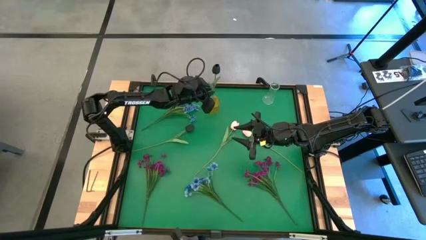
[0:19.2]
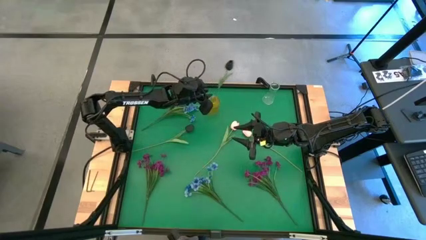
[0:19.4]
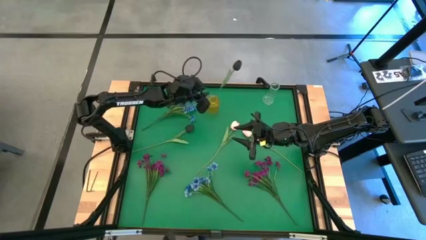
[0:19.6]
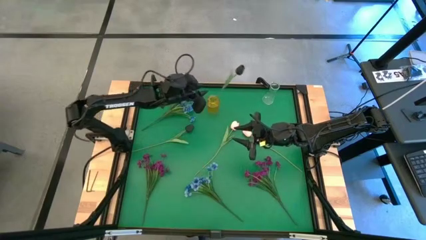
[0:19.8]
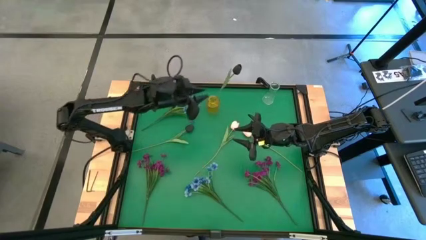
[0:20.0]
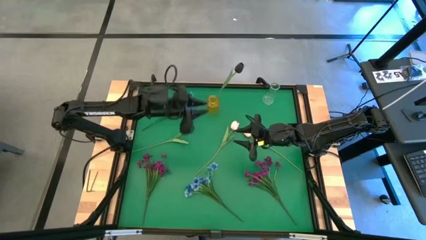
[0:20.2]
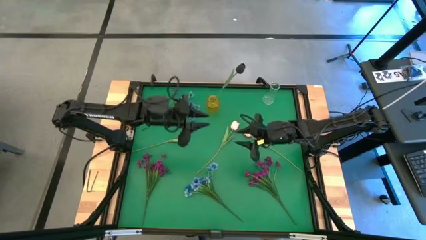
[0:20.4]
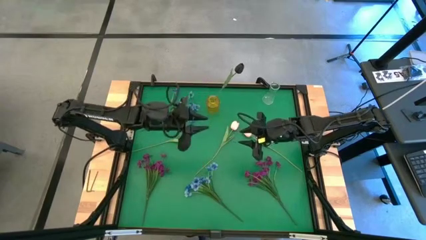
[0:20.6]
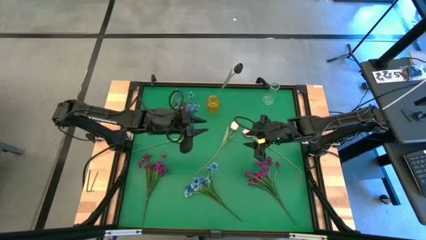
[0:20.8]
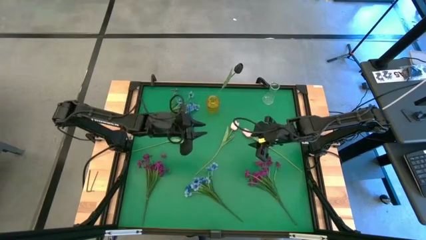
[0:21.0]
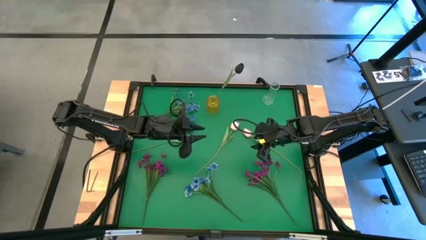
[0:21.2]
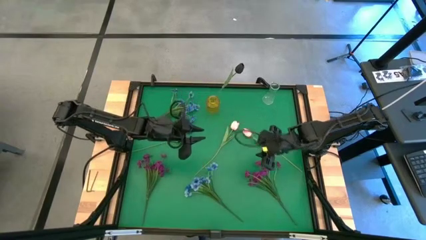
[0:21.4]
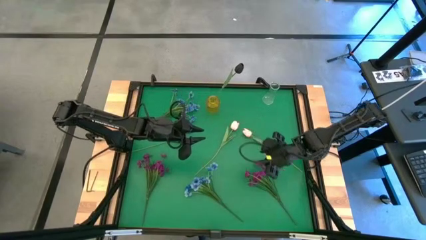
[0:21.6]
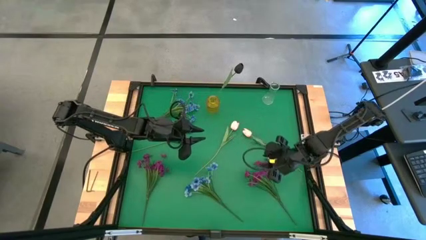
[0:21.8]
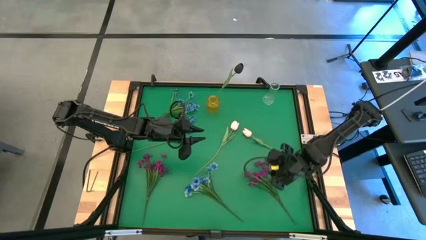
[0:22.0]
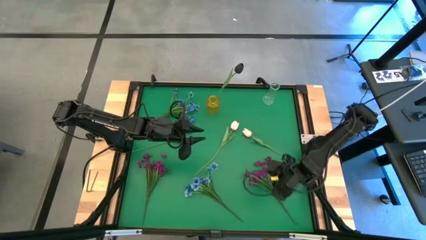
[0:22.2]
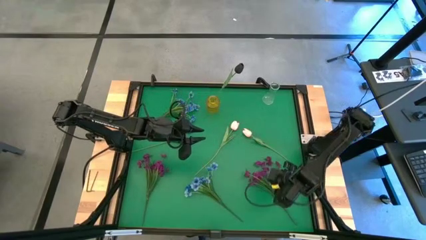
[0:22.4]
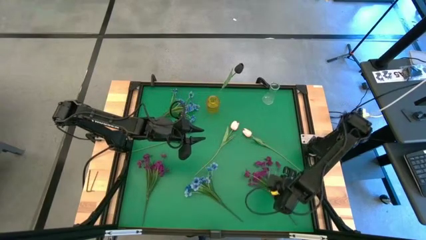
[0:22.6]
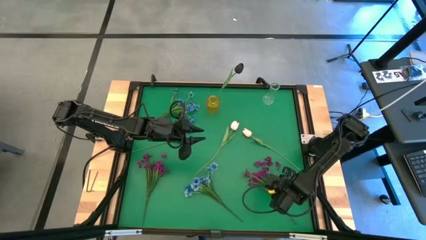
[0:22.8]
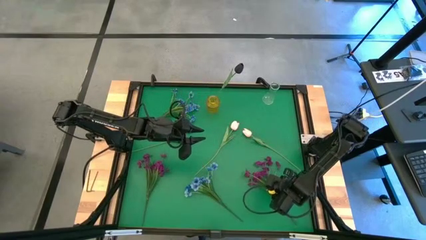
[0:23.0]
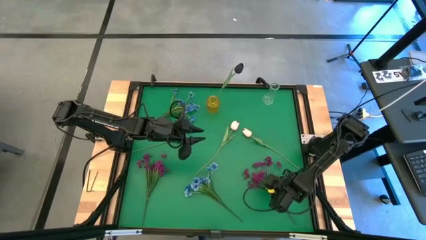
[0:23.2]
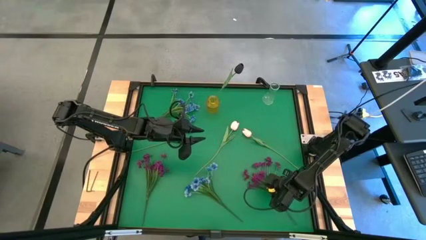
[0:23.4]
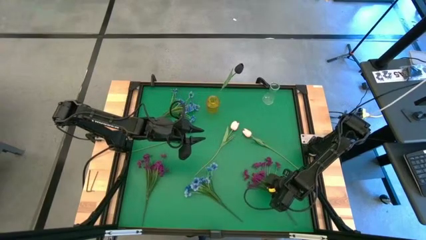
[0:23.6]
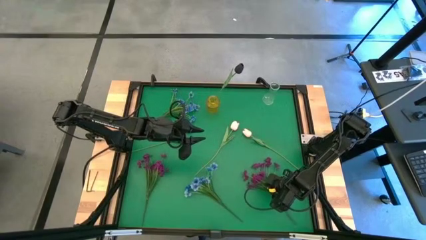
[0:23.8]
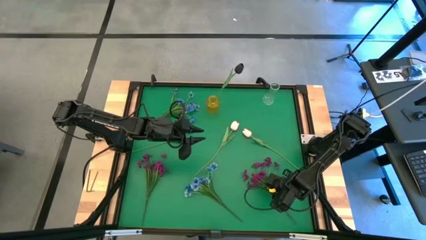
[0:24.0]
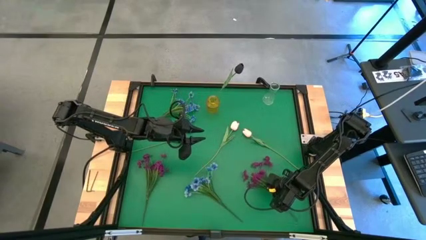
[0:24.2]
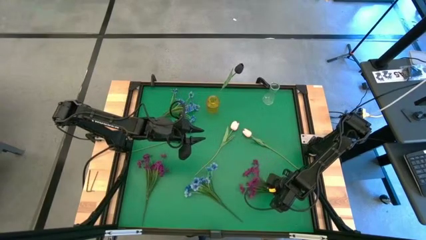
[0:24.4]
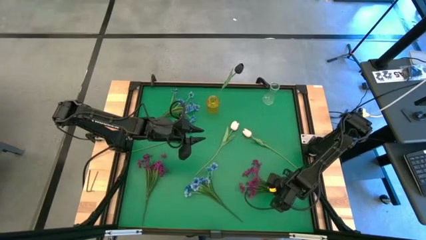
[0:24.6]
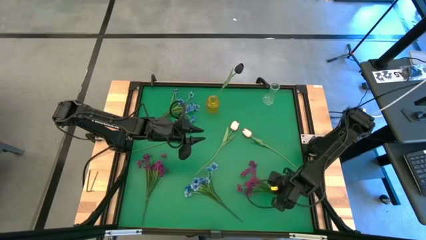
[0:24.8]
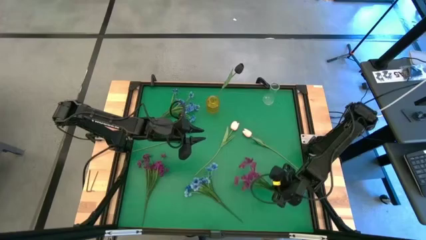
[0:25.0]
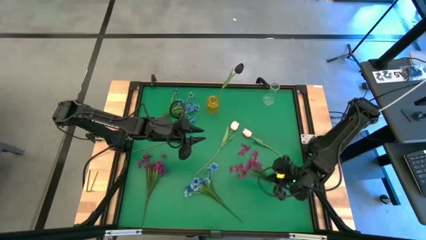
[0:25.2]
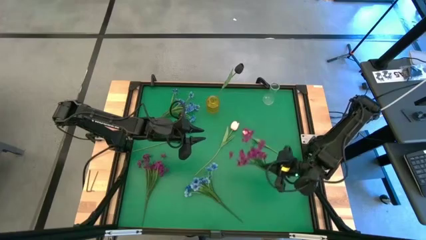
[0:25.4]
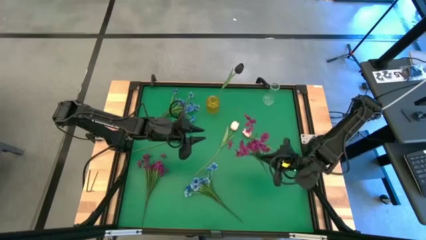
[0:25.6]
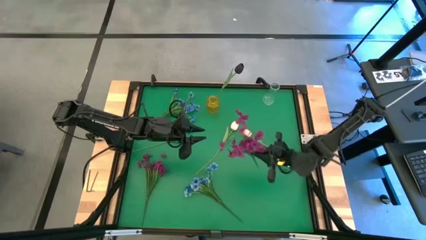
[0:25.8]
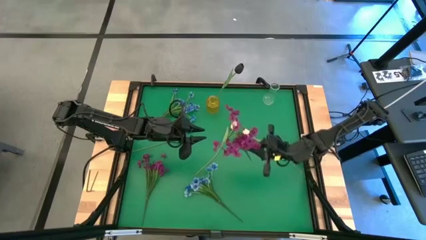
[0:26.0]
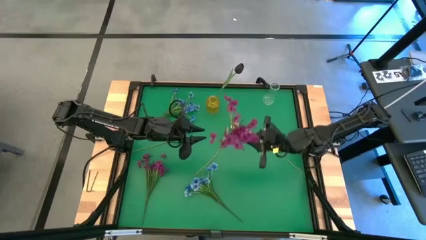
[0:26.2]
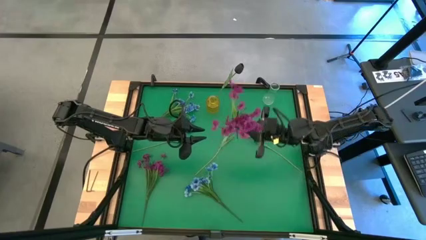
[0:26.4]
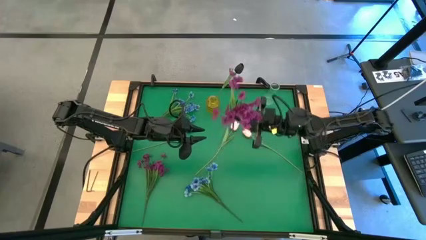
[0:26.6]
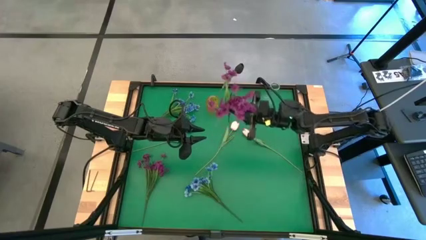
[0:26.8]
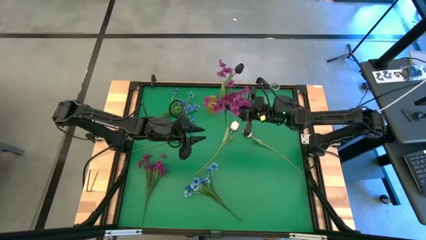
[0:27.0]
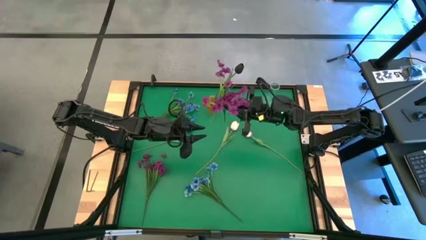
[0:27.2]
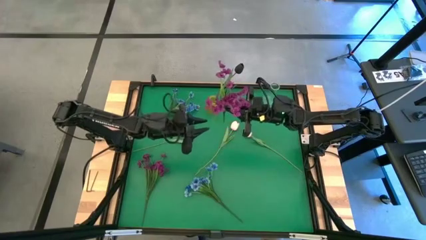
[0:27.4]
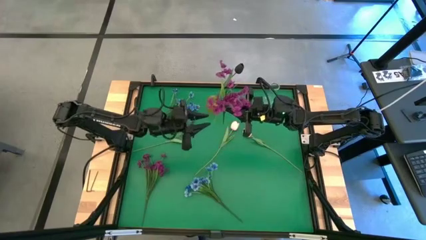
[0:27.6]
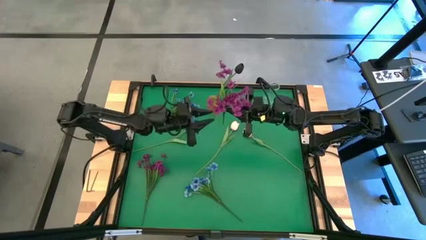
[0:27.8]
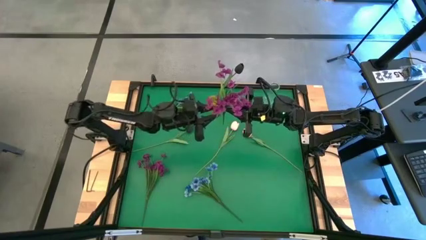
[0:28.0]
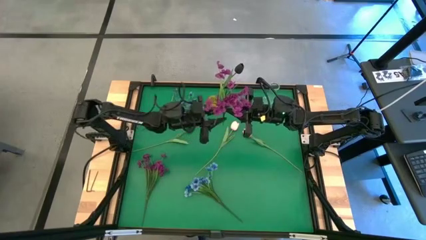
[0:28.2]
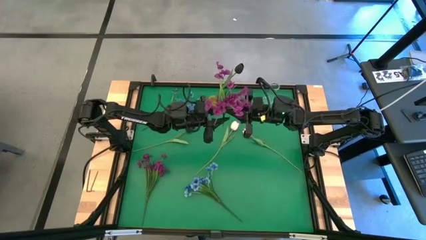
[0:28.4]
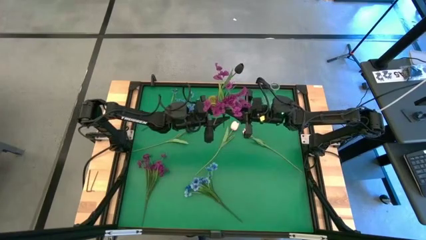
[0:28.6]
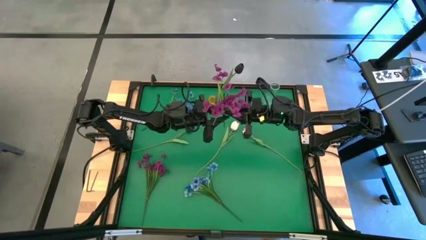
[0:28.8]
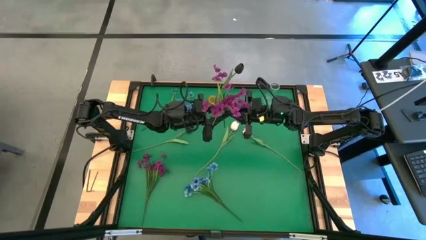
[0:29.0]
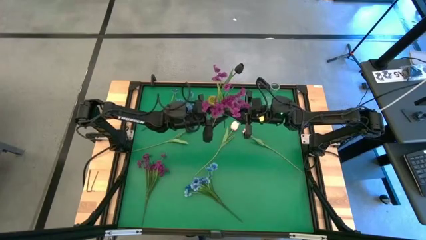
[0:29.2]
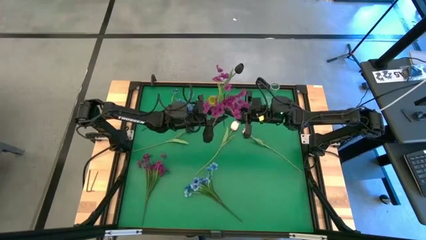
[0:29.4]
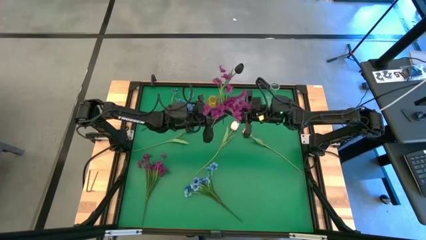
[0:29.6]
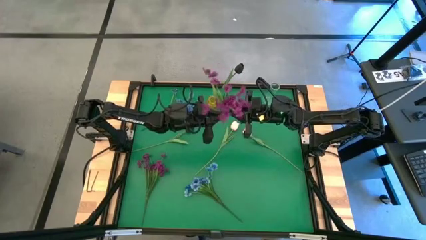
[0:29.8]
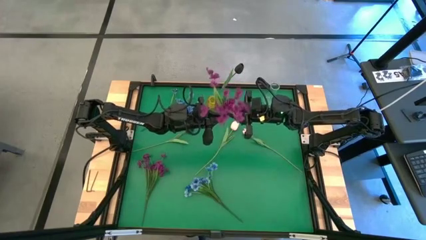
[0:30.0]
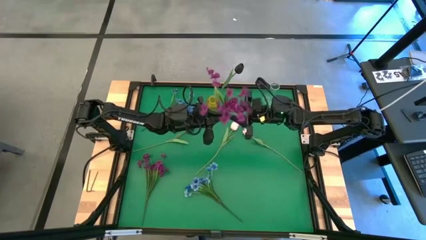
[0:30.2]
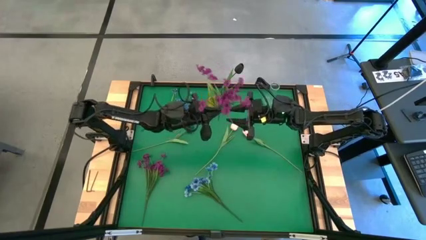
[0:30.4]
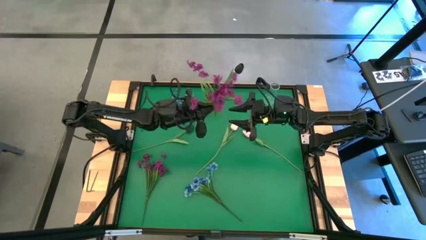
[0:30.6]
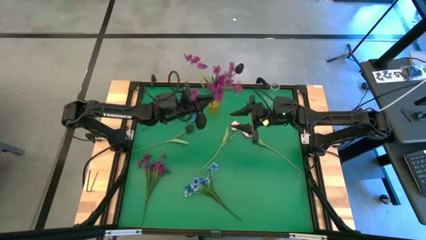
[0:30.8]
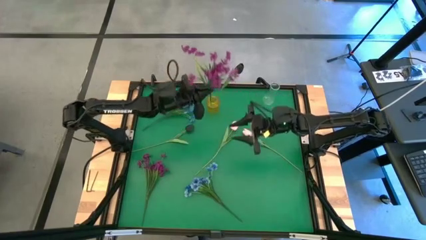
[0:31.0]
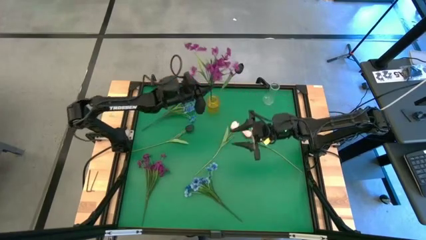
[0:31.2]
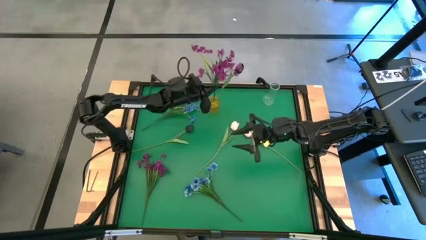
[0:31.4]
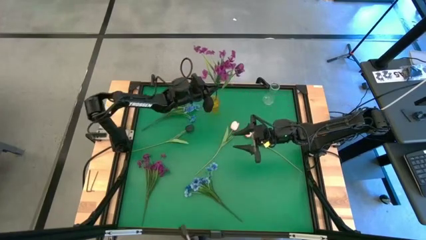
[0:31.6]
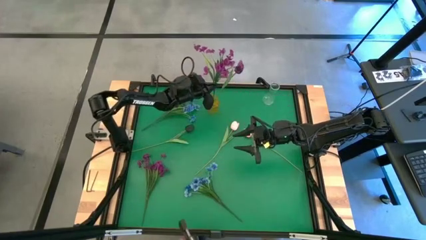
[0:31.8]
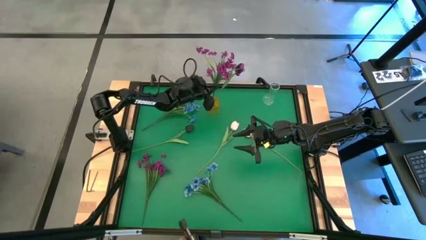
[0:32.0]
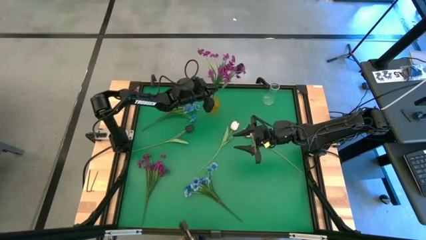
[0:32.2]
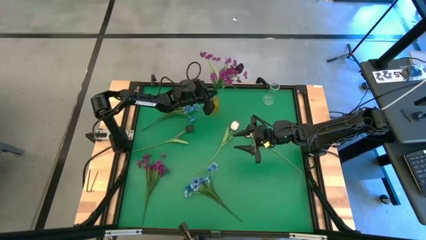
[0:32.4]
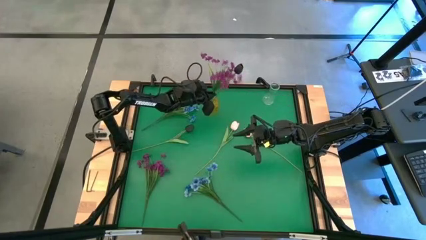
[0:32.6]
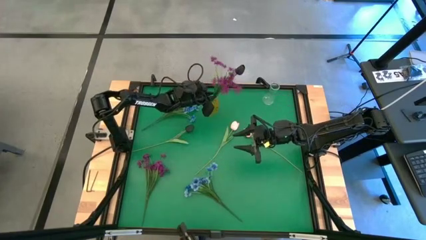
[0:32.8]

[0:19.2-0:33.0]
Task: Sort flowers into vase by color
Put the right purple flowers into the yellow vase

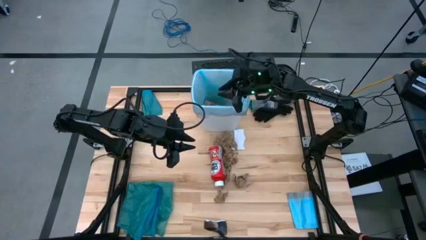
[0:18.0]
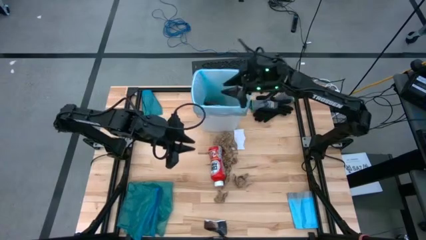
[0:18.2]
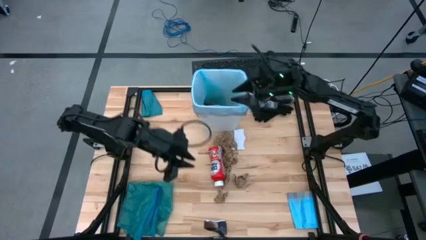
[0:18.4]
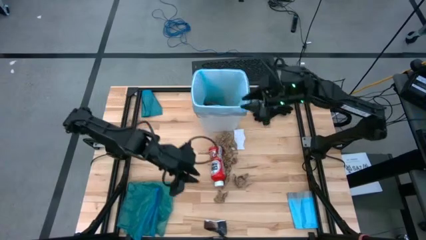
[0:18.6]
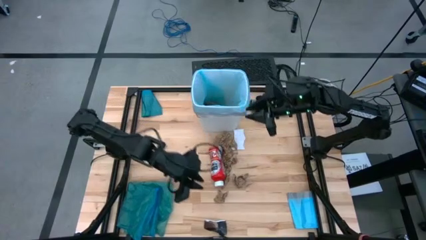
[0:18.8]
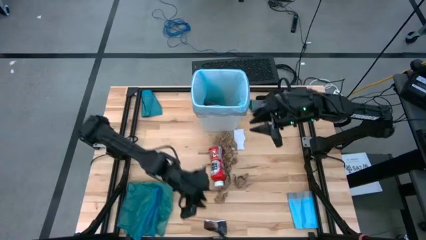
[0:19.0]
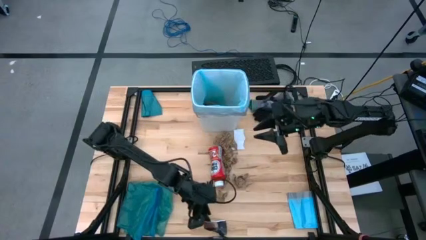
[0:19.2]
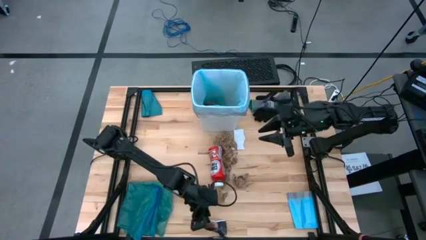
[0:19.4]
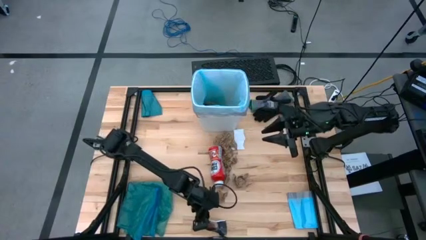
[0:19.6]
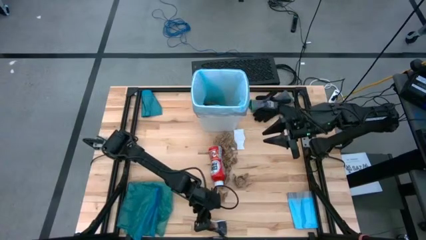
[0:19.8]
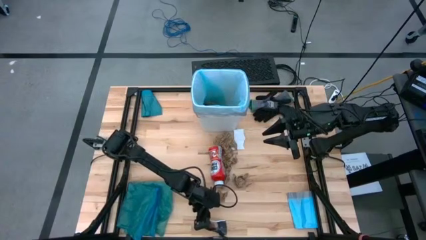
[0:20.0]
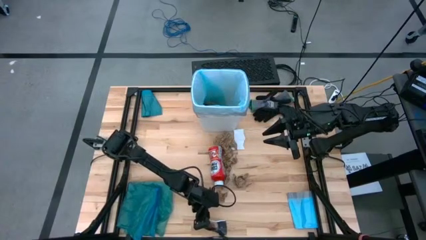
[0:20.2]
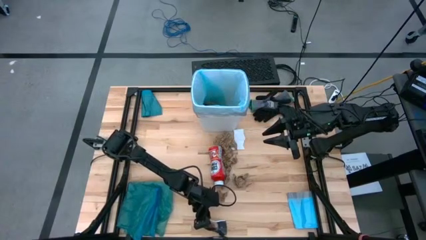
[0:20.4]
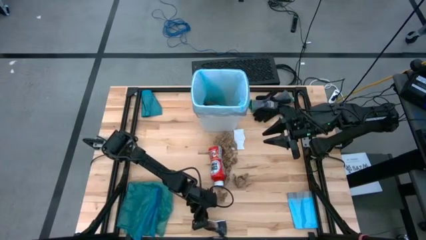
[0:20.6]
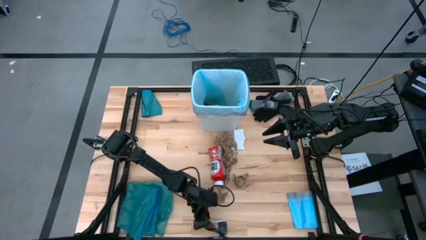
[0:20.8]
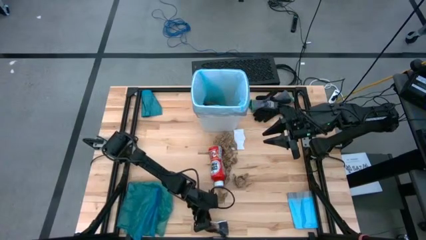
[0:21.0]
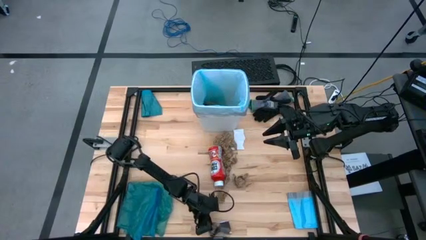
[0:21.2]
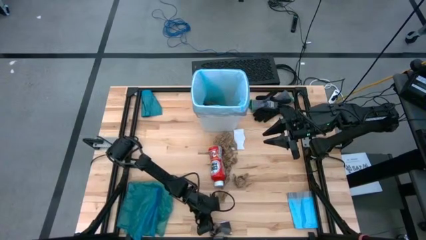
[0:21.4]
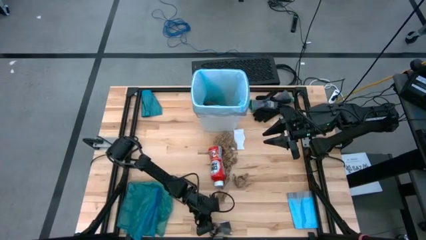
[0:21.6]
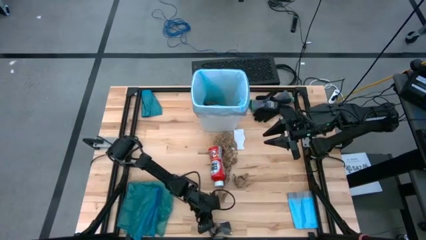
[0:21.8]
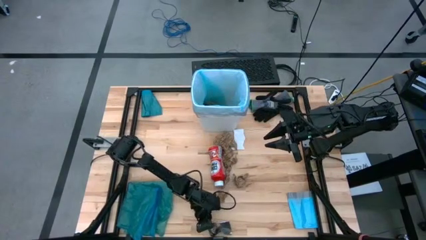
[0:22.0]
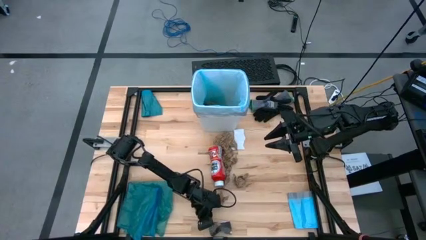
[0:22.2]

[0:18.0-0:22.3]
Task: place trash/remove bag and relplace
Put the white paper into the white trash bin
